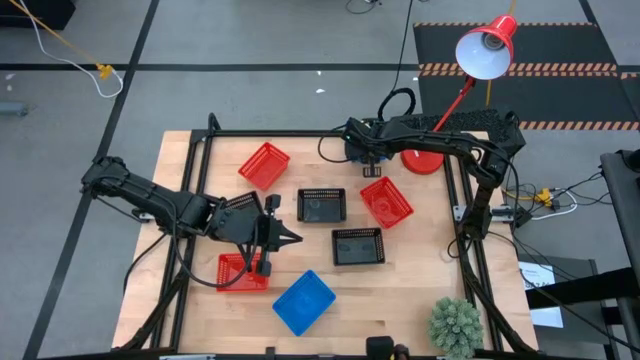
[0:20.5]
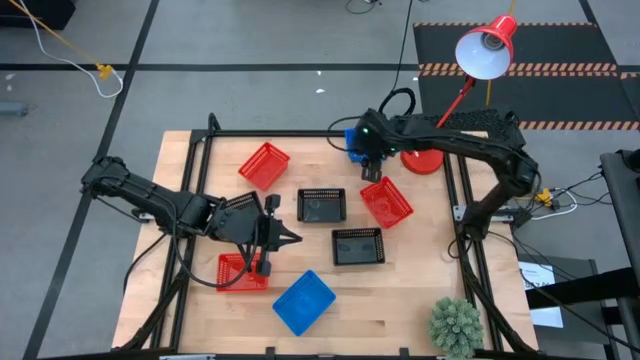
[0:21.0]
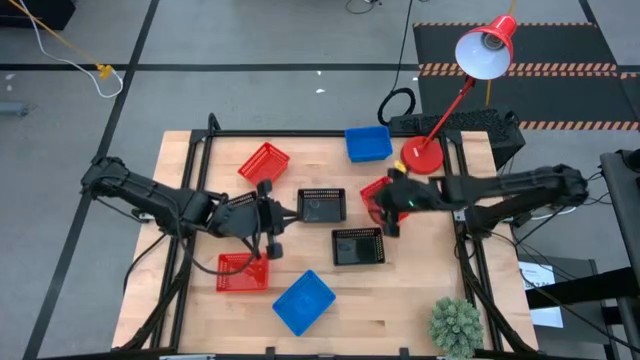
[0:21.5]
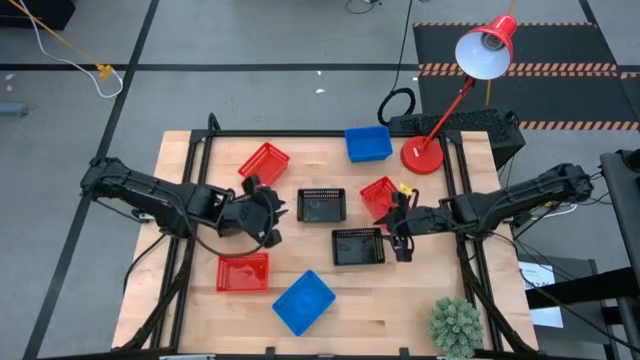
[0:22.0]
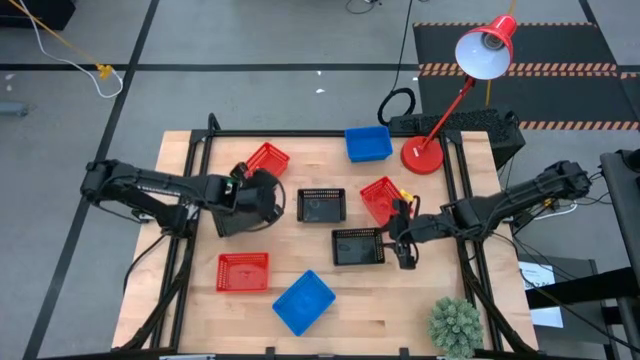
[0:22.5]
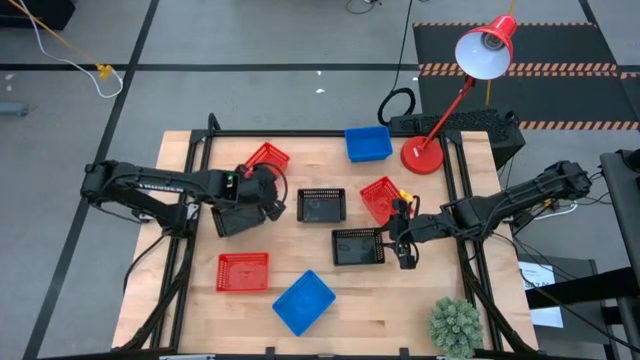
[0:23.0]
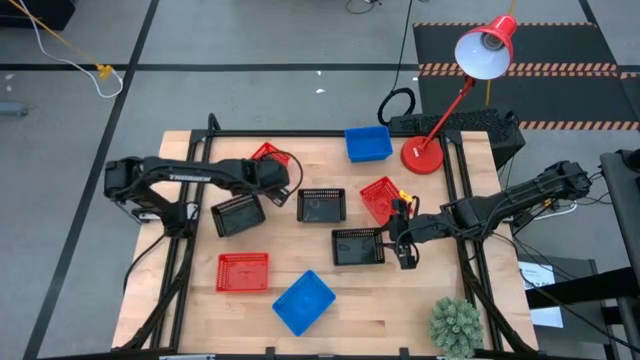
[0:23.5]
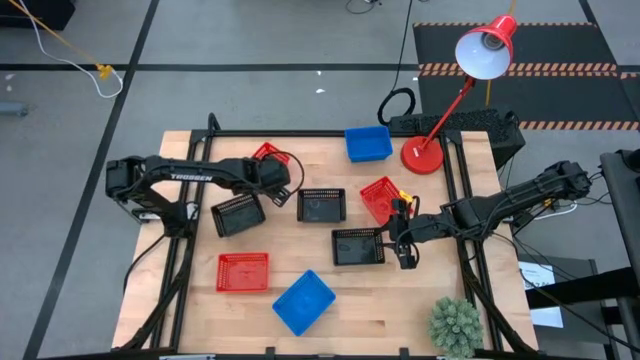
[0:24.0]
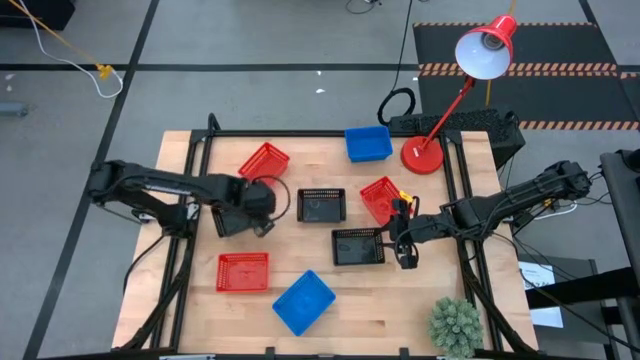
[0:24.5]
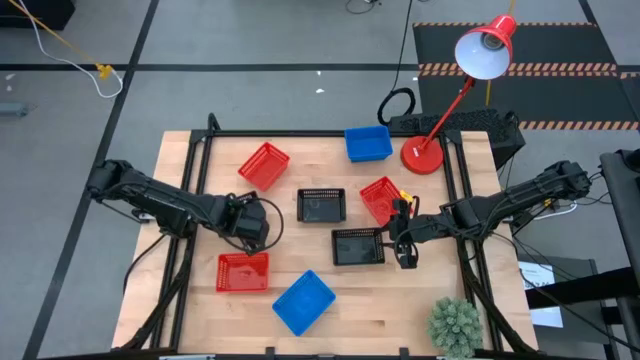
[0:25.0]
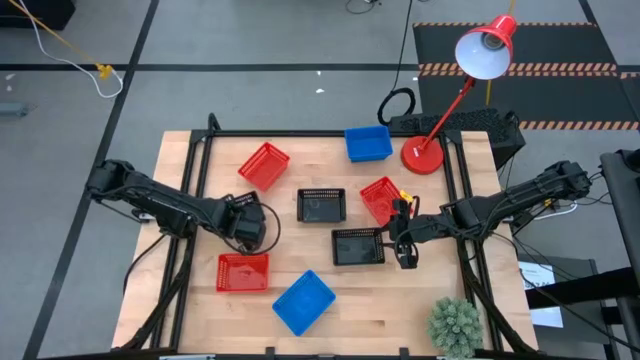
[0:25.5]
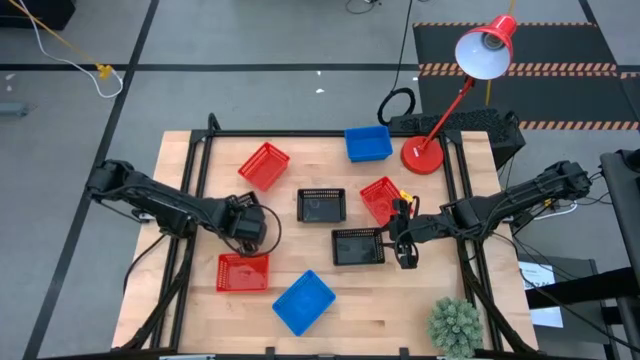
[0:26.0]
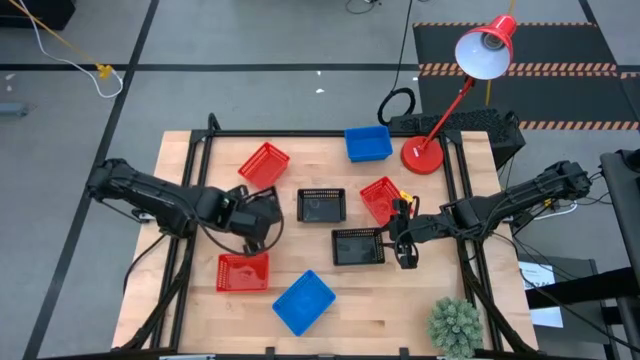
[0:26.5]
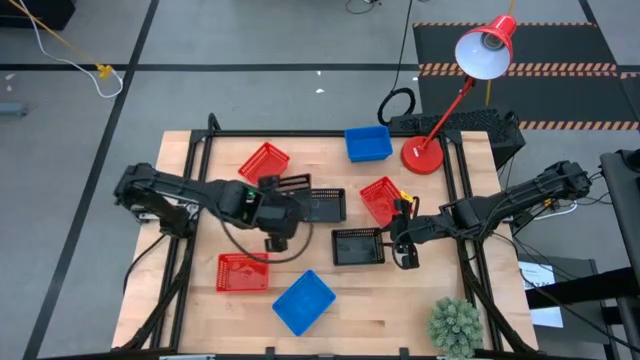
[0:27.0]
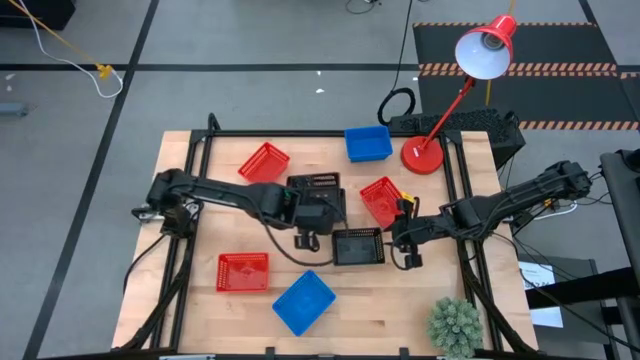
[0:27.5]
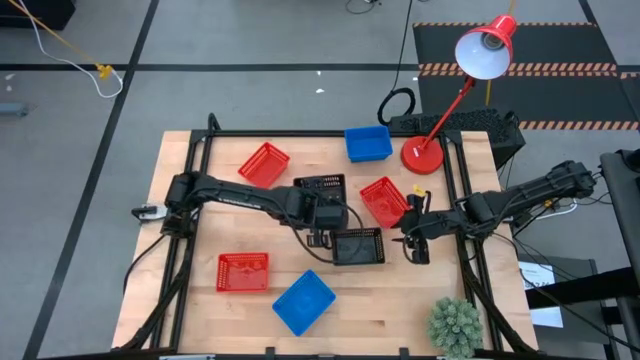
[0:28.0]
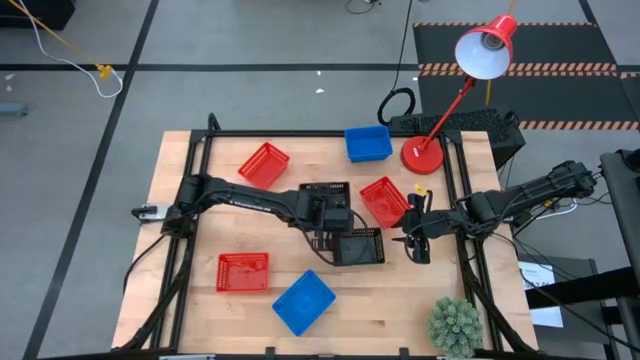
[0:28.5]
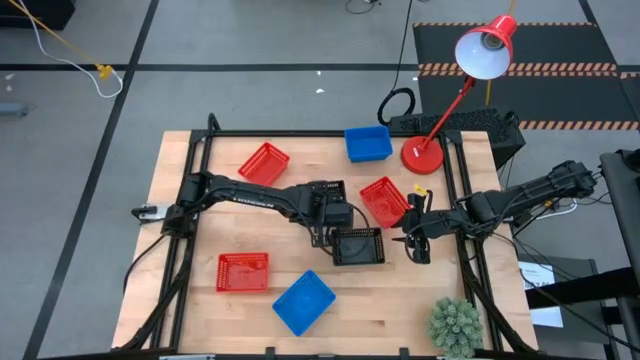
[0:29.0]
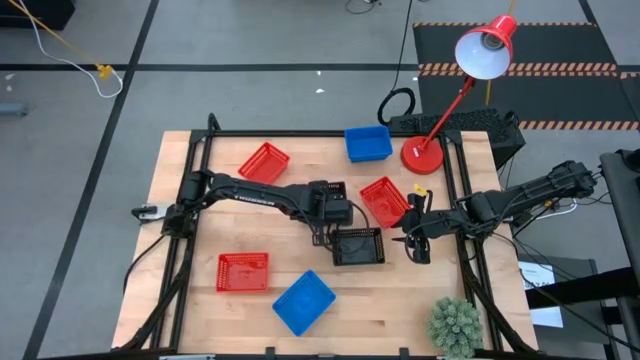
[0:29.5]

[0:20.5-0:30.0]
Stack the top left black basket on the top right black basket

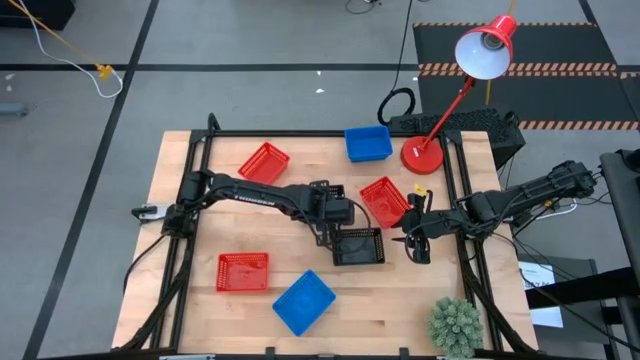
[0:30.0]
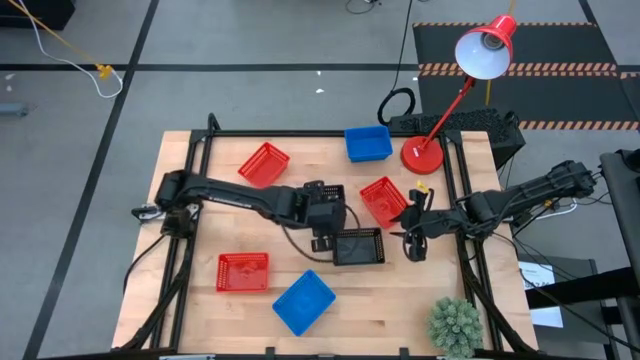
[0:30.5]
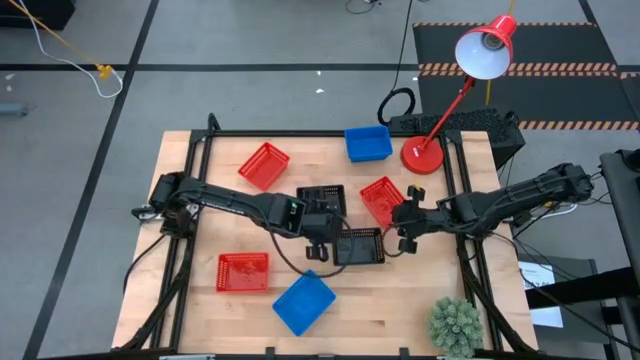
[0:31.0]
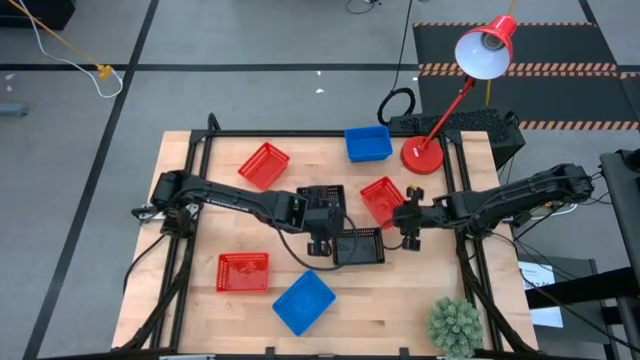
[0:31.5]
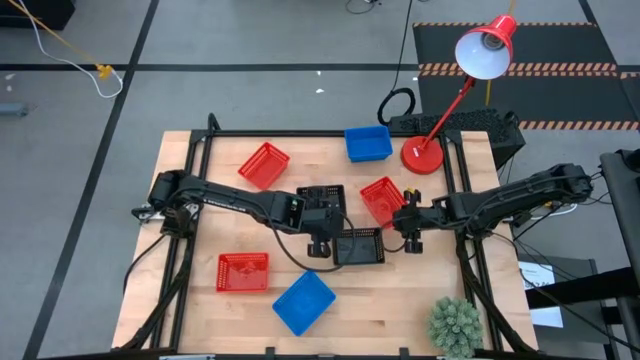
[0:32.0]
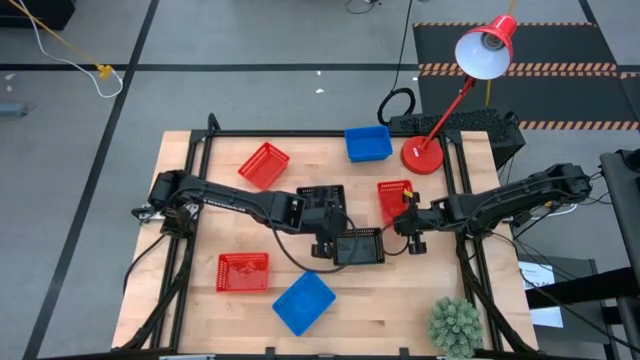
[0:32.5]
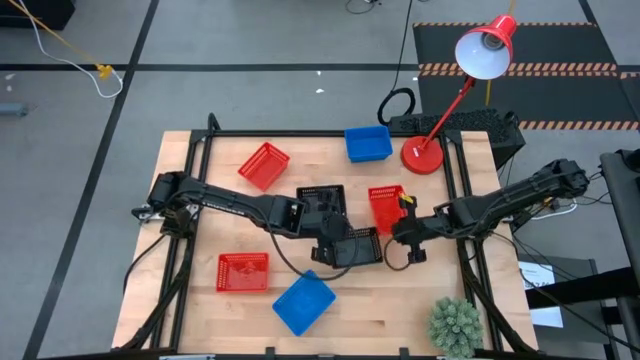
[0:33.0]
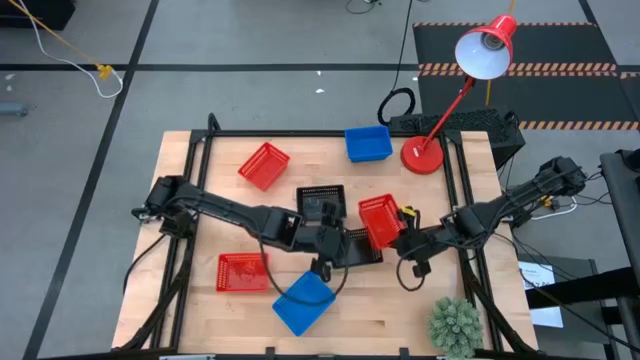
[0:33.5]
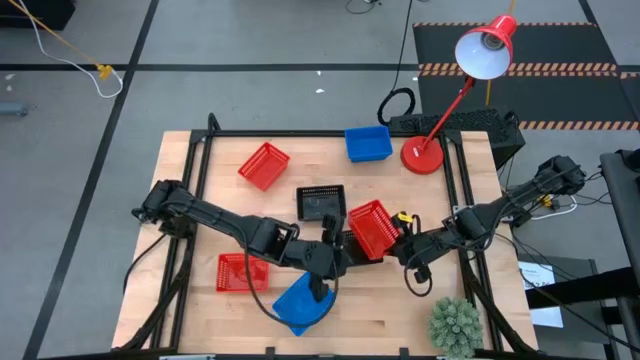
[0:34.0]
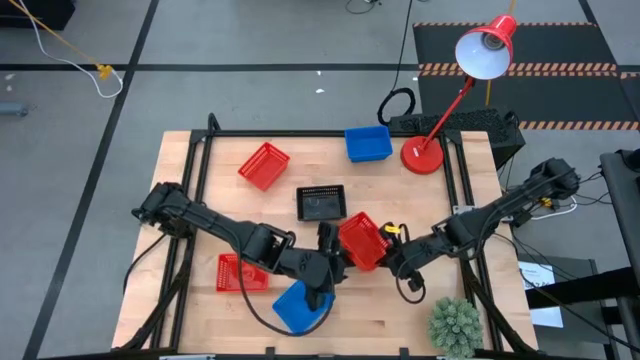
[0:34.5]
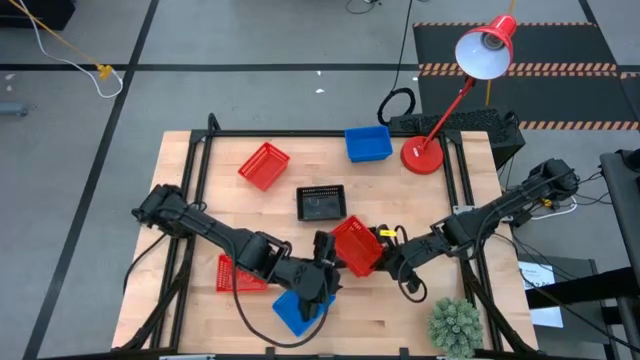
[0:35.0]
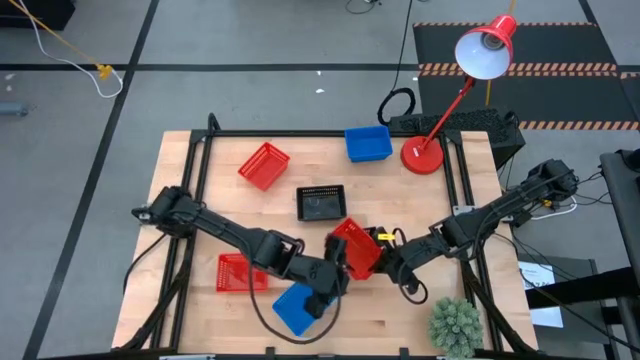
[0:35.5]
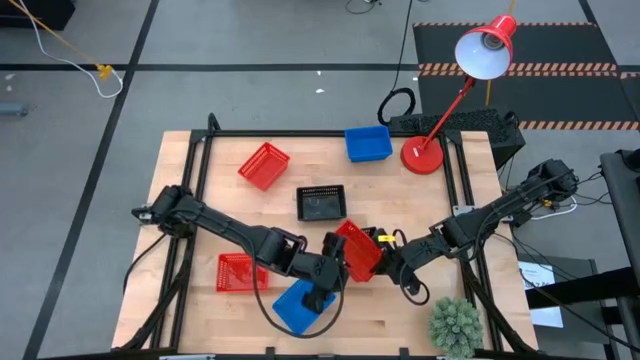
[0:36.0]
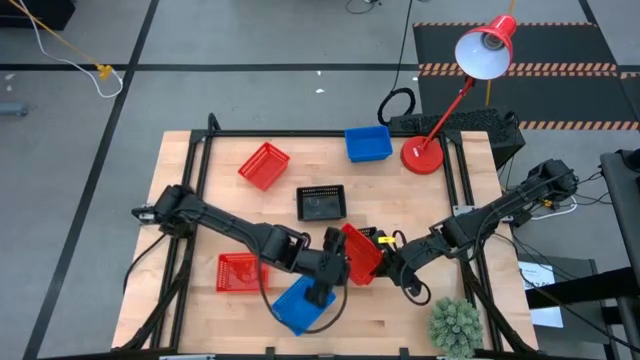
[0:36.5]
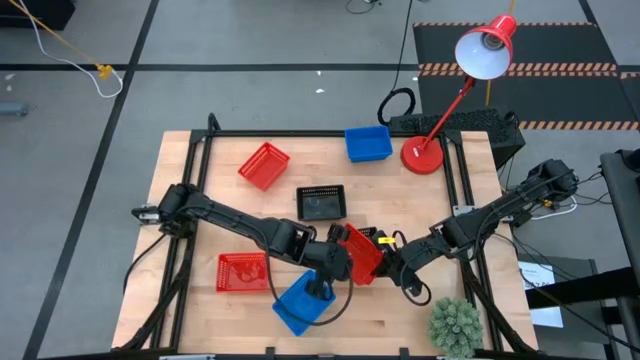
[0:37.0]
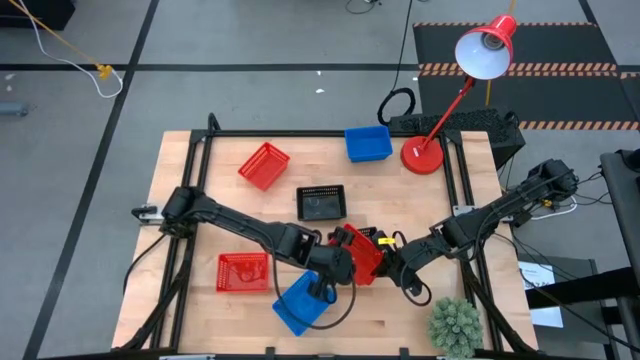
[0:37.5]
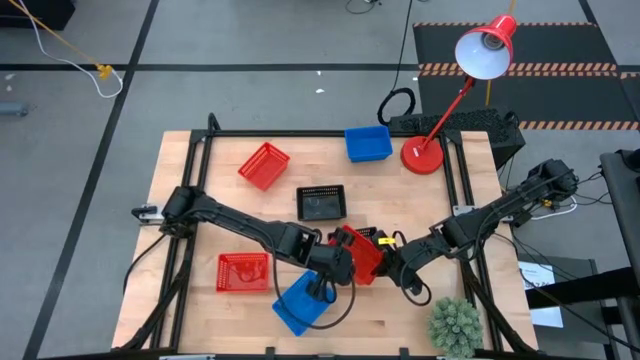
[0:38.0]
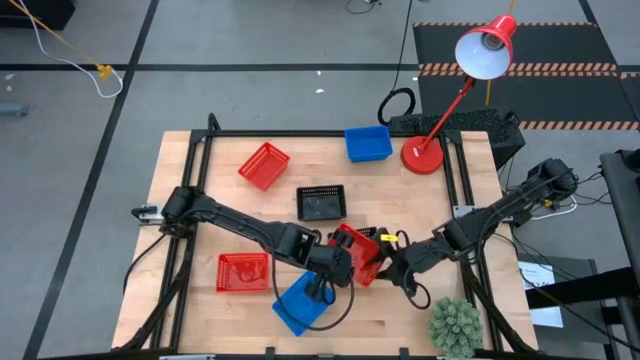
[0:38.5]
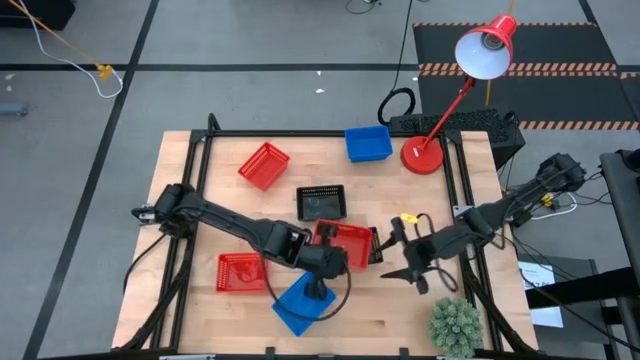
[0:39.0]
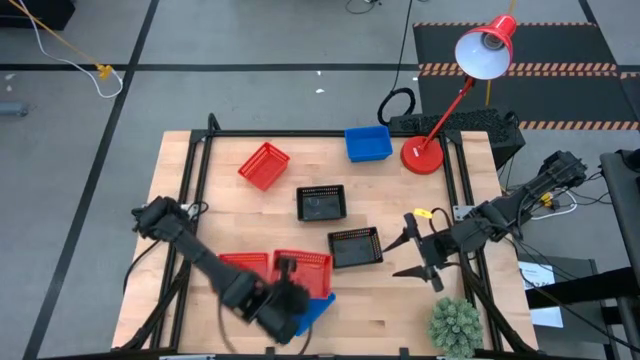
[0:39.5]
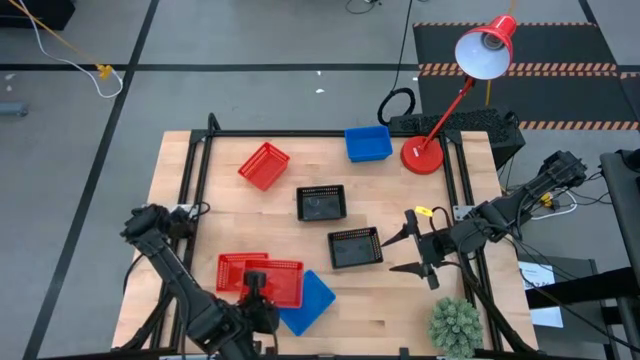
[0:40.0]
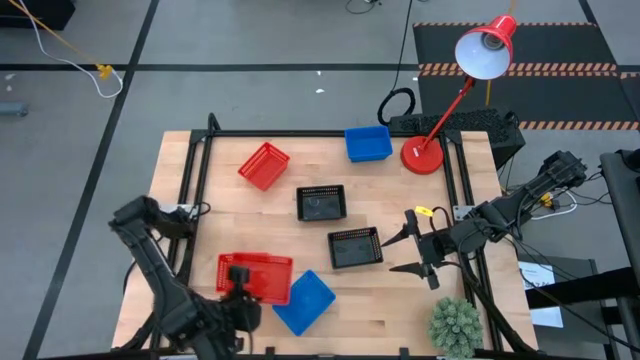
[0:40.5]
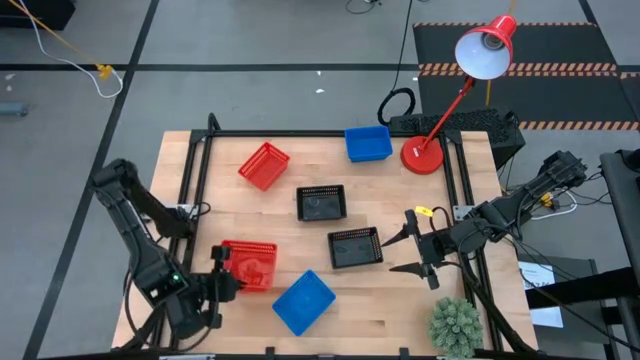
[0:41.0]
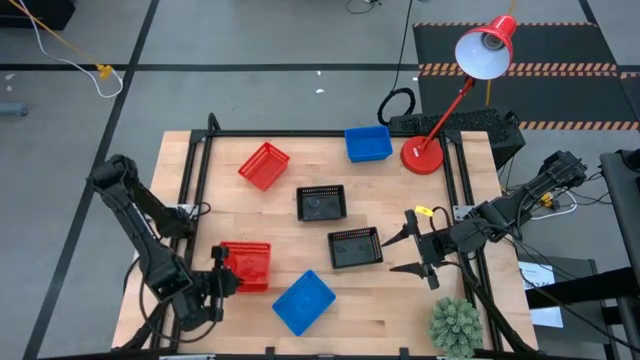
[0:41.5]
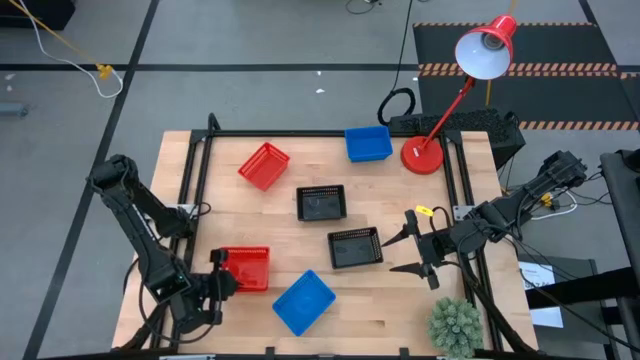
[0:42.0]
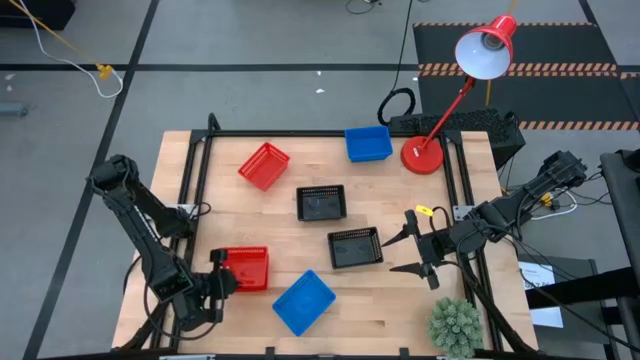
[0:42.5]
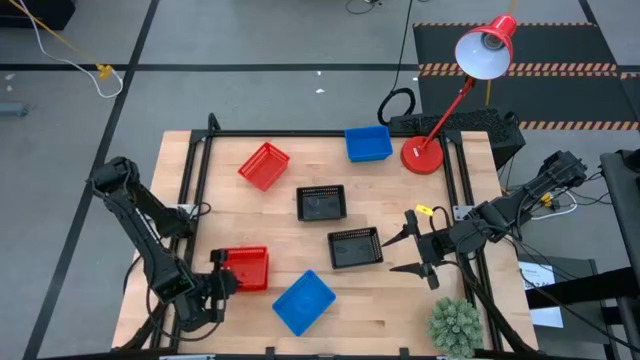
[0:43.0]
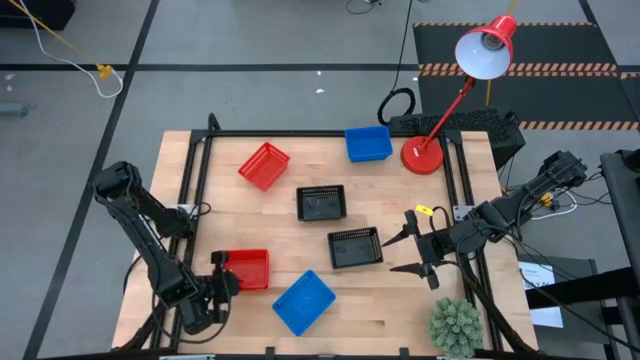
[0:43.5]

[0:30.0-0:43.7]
Stack the right red basket on the bottom red basket
